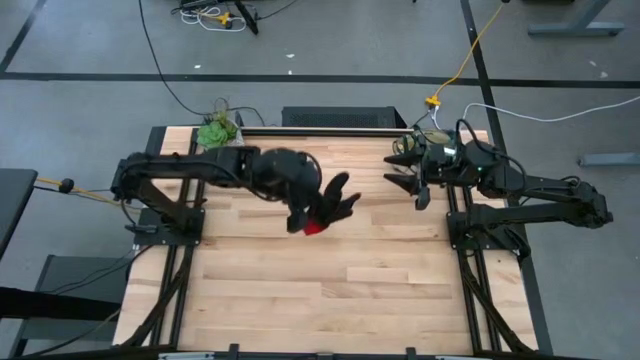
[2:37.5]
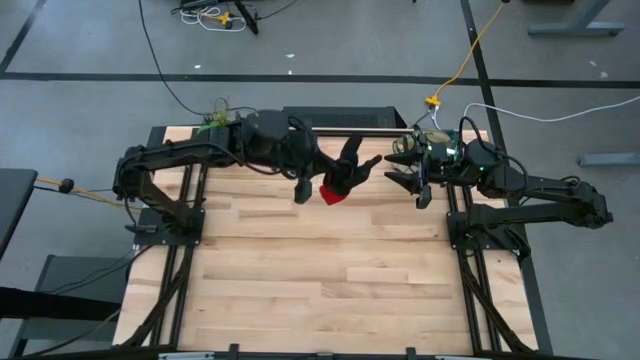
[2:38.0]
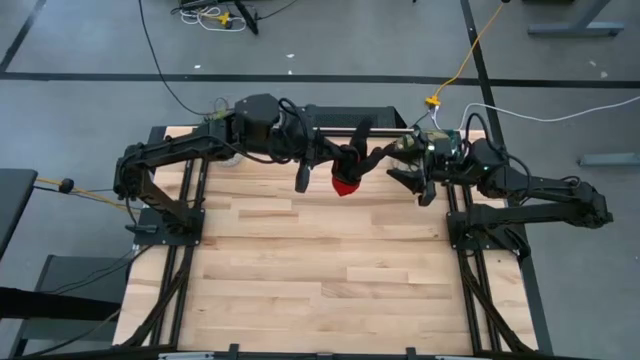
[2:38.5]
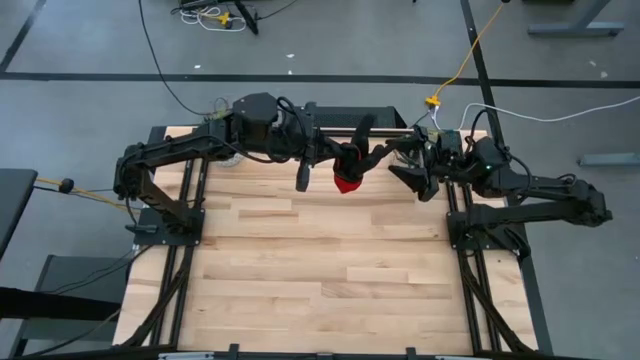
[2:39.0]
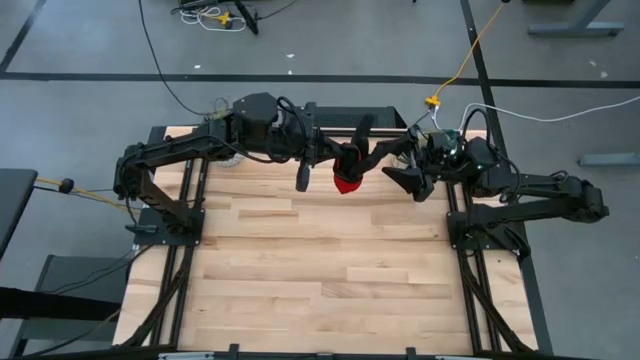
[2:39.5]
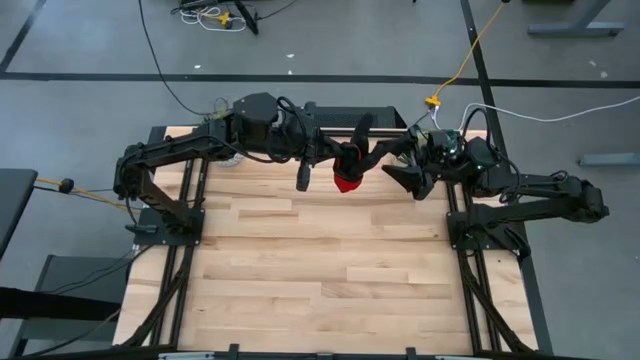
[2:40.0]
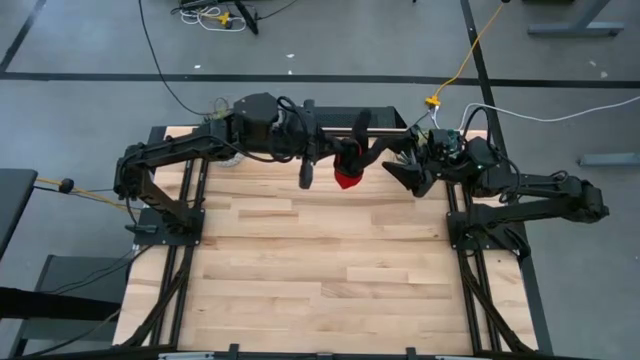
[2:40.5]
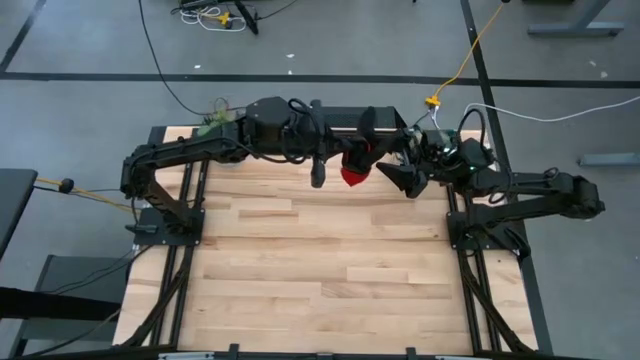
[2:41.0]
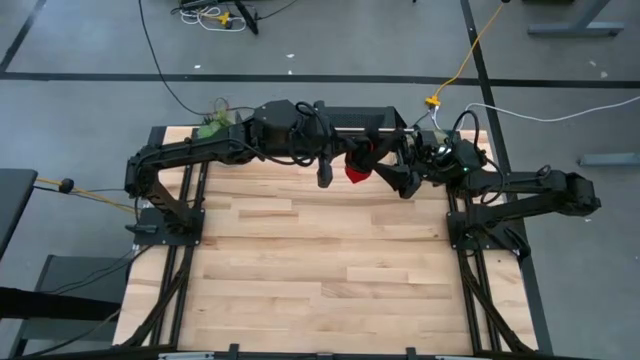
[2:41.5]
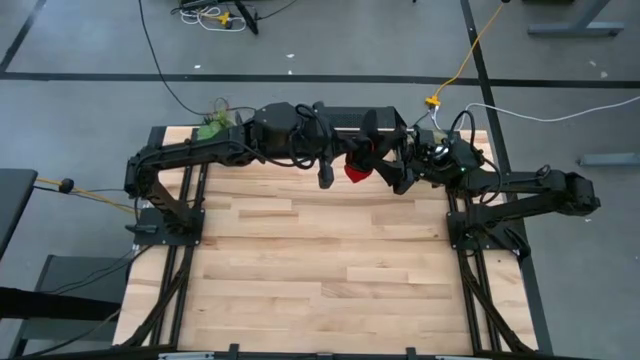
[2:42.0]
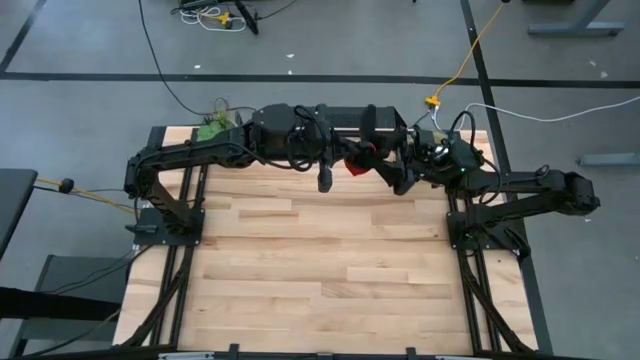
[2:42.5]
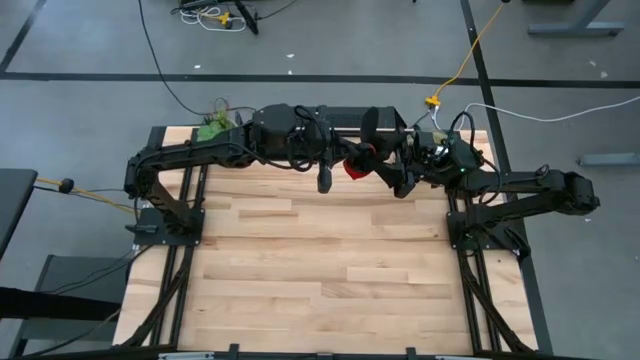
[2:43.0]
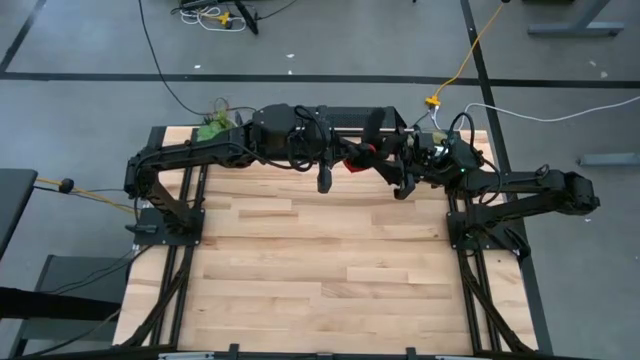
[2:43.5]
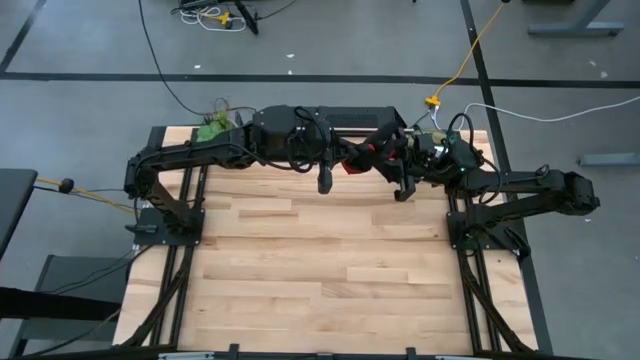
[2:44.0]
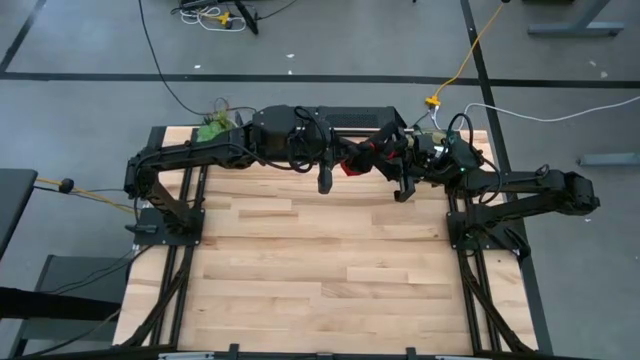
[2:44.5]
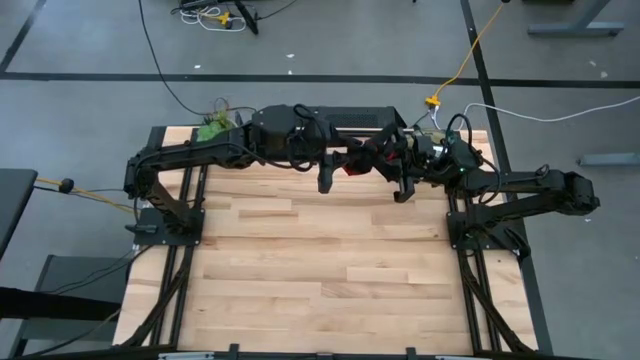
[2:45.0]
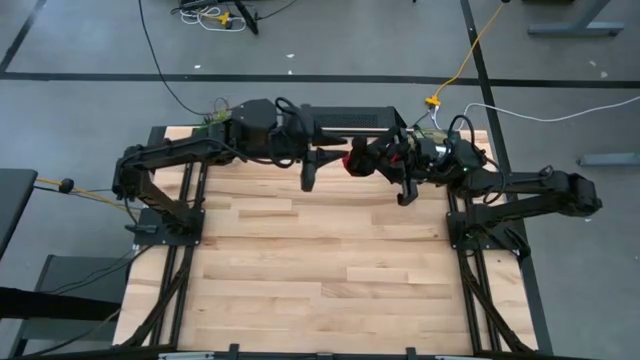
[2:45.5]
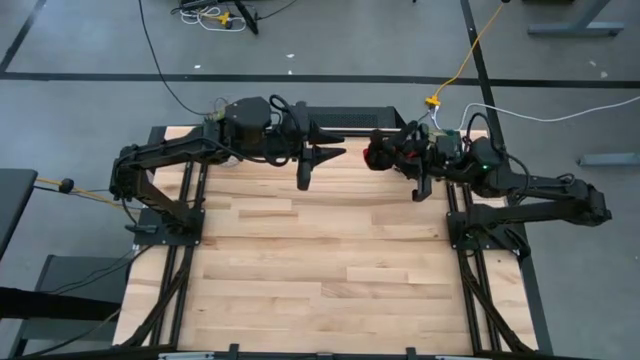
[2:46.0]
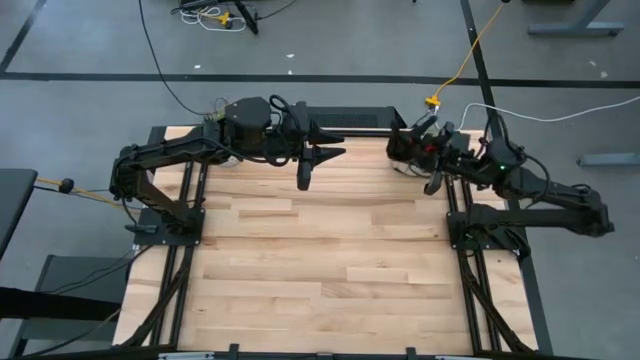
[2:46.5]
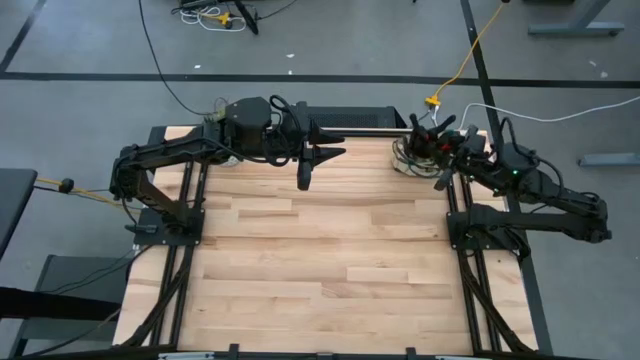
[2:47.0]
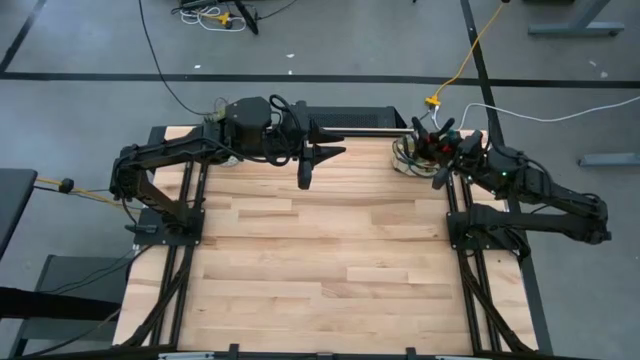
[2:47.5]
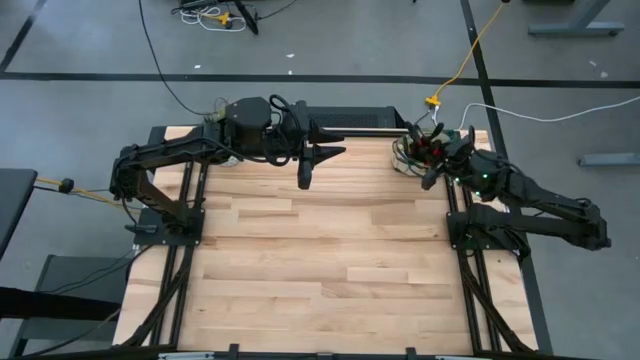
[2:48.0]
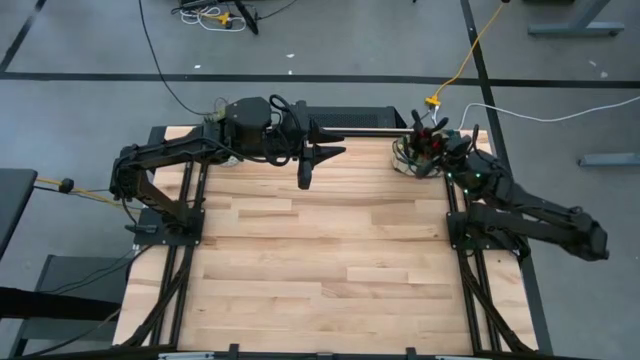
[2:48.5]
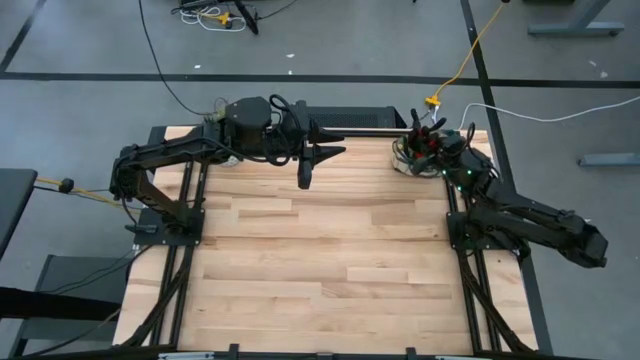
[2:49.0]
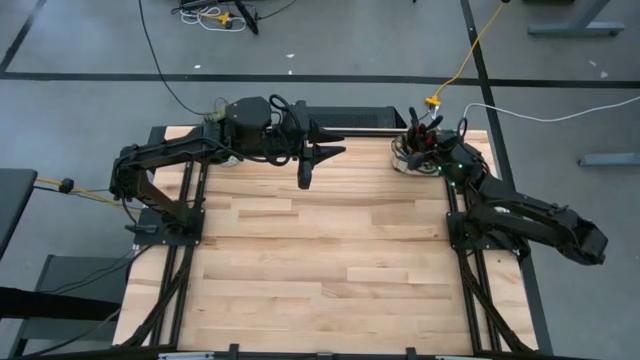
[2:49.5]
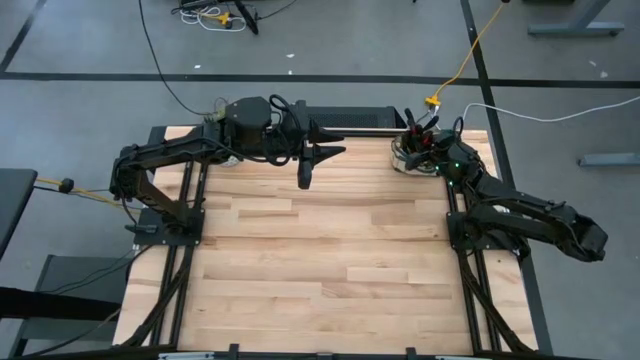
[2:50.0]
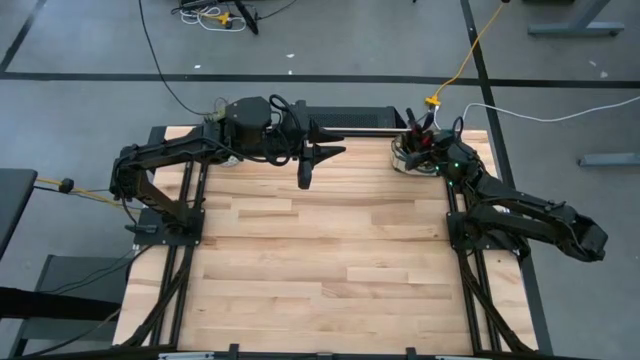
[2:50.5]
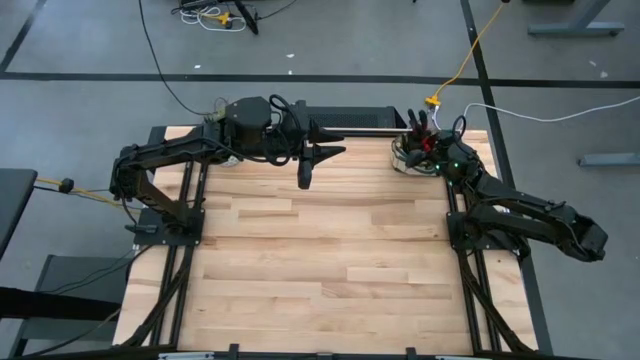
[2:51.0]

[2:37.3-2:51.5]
Task: Pick & Place Garden tools in Gardening bag
Put the red gloves into the brown gardening bag

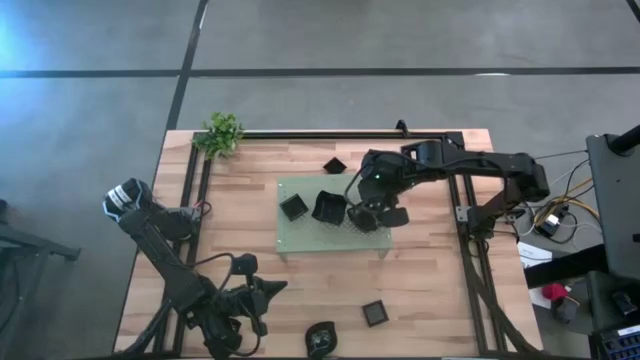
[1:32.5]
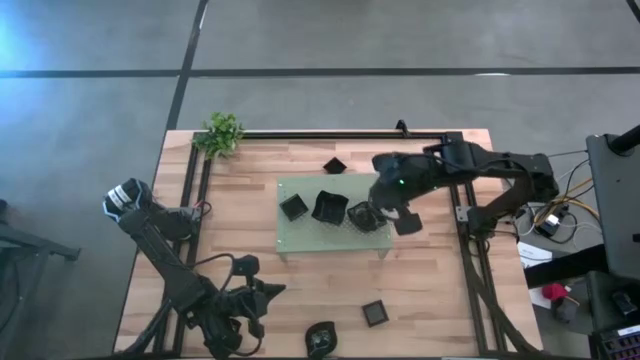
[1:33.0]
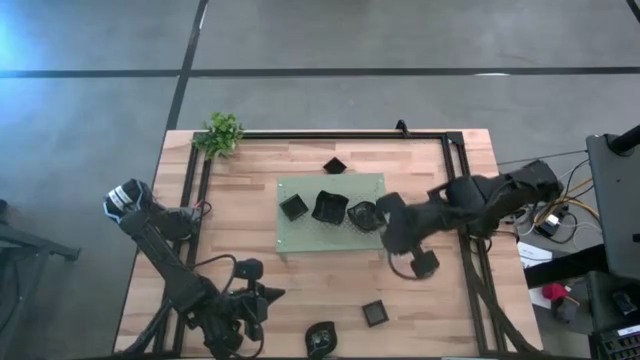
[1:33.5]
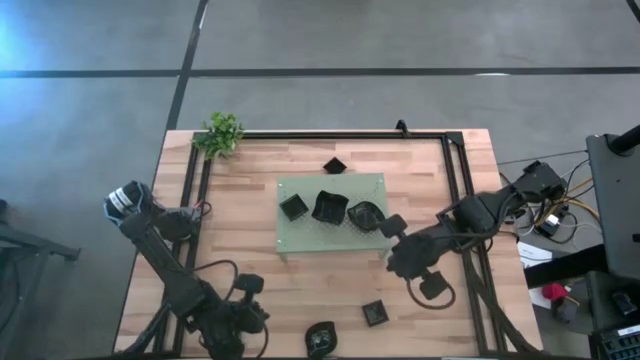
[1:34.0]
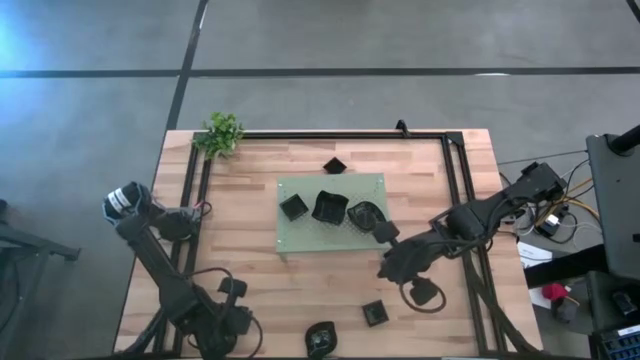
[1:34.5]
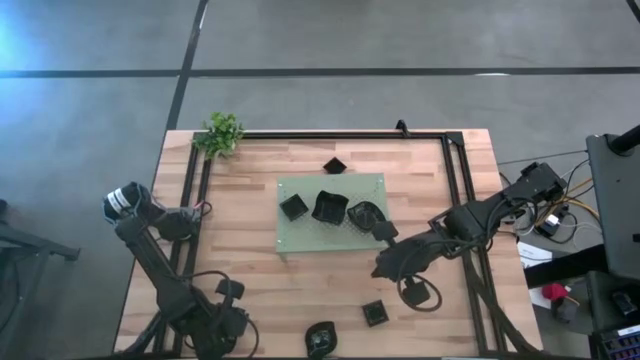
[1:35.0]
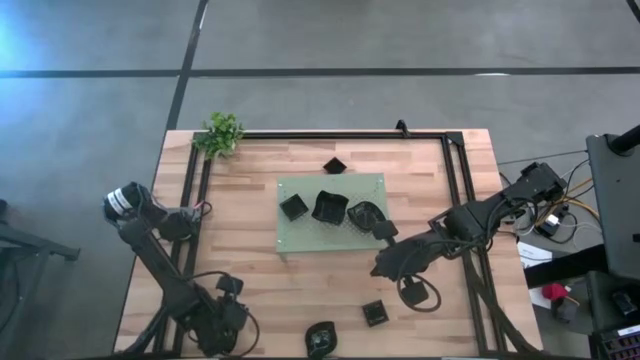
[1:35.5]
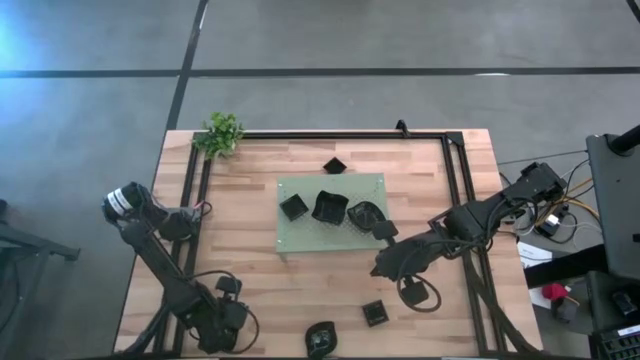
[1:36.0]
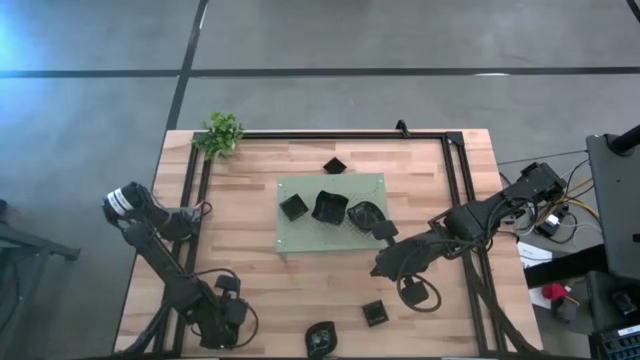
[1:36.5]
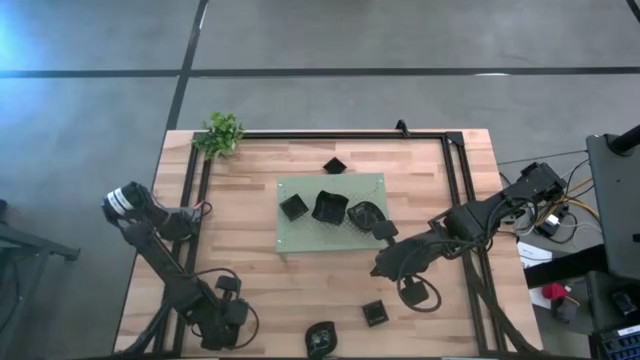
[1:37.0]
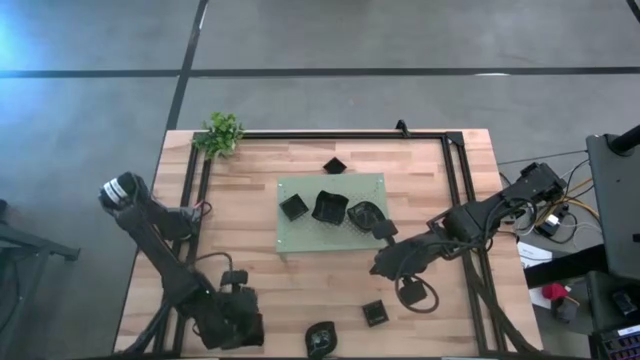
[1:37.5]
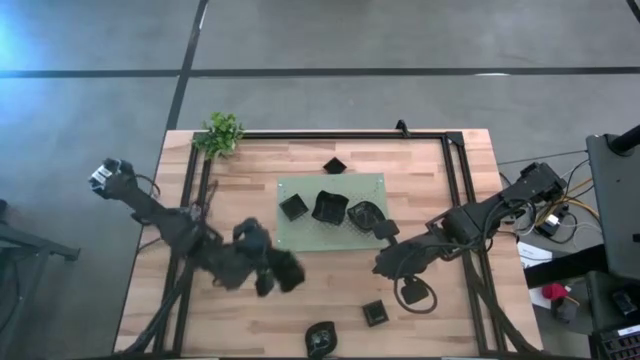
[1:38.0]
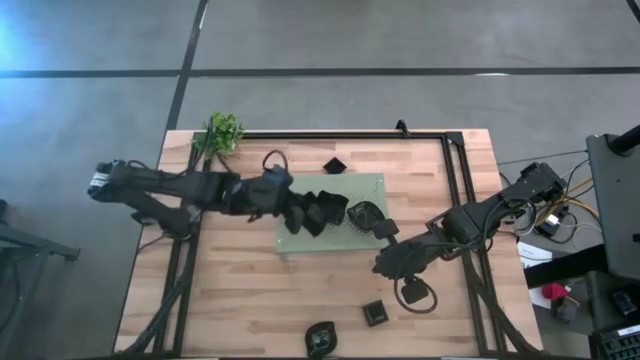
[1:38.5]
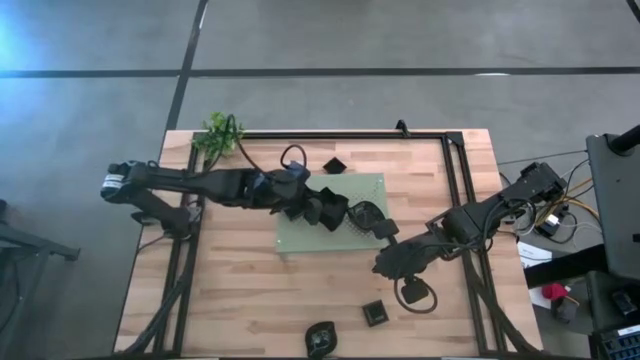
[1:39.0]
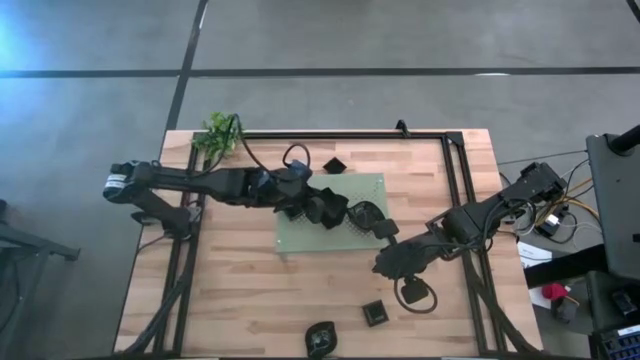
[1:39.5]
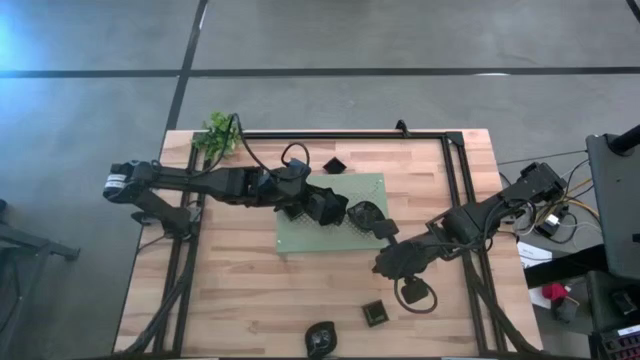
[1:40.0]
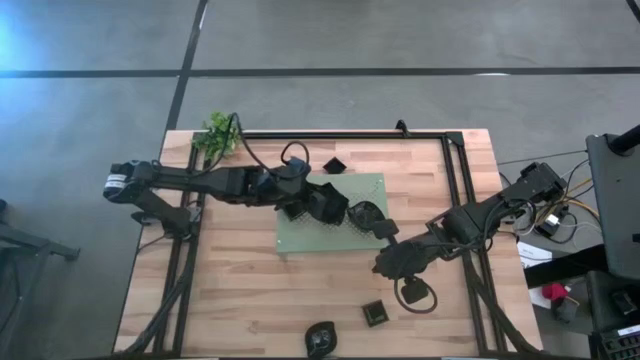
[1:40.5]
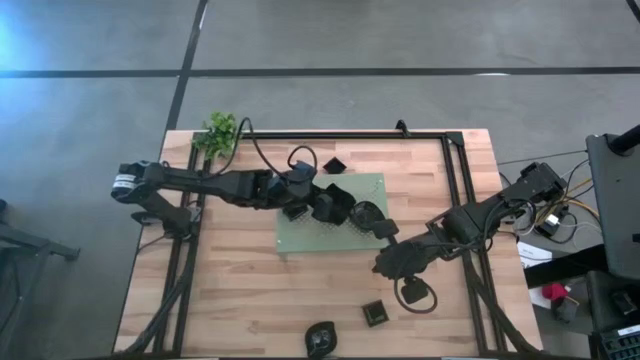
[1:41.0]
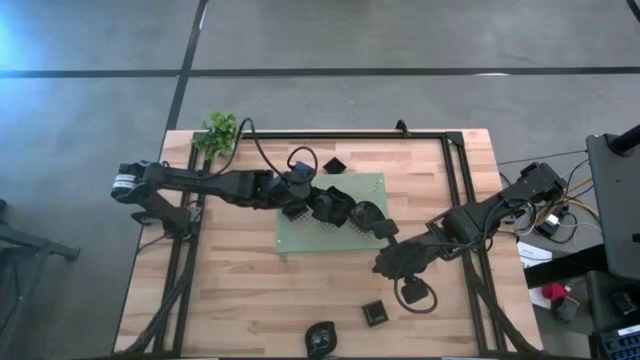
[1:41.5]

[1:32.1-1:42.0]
Task: Pick & Place Mini shaped plates
Stack the distorted square plate on top of the distorted square plates on the shelf
